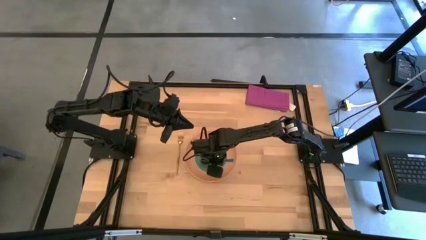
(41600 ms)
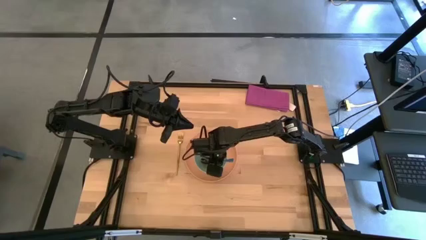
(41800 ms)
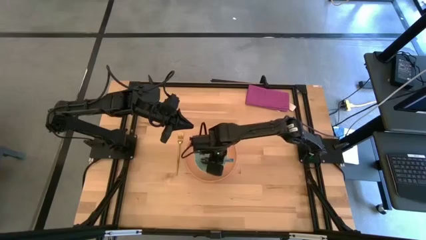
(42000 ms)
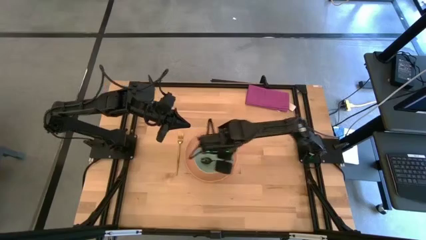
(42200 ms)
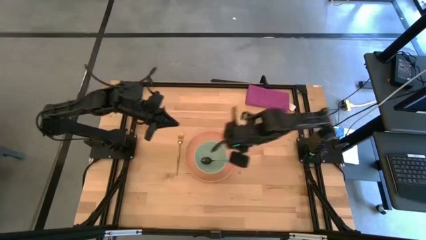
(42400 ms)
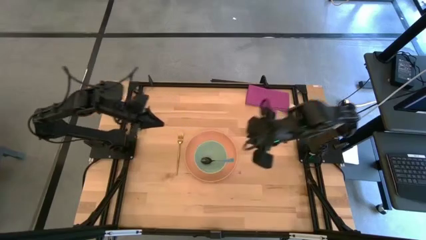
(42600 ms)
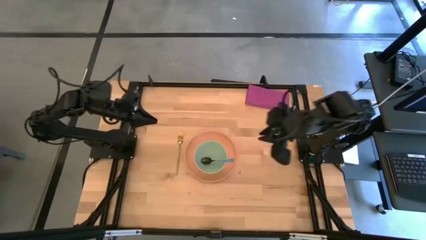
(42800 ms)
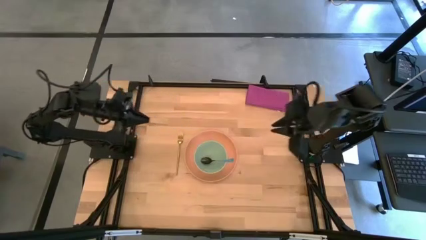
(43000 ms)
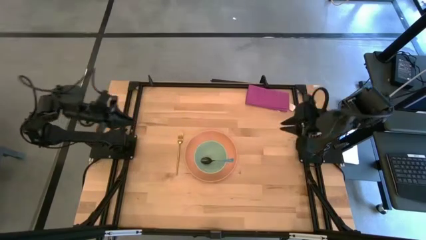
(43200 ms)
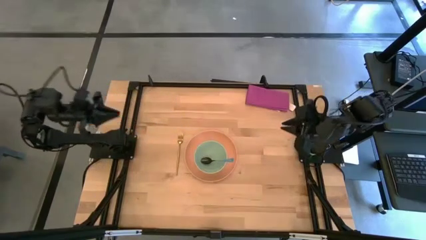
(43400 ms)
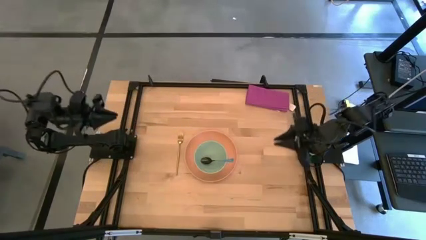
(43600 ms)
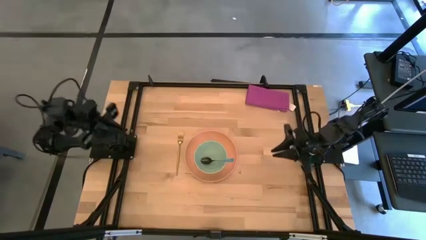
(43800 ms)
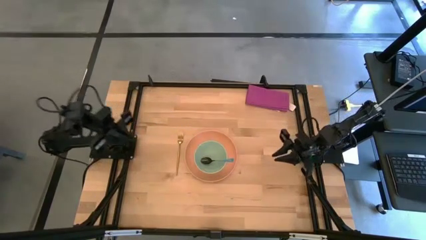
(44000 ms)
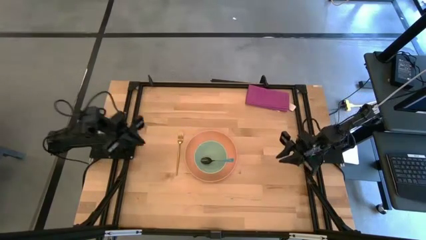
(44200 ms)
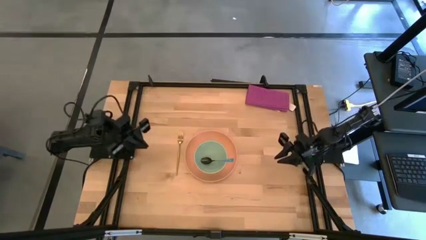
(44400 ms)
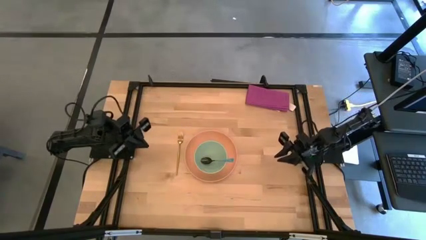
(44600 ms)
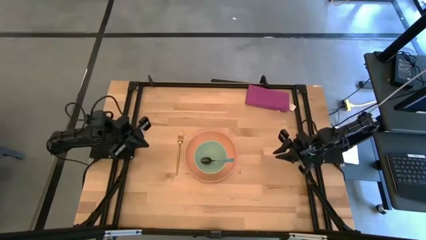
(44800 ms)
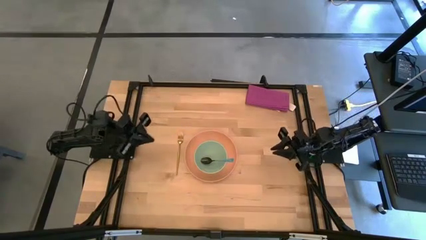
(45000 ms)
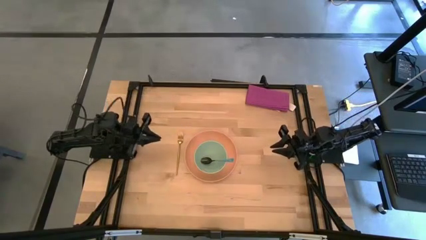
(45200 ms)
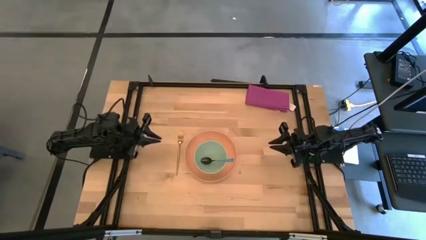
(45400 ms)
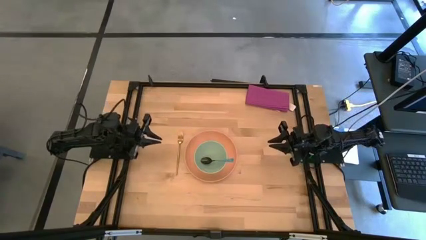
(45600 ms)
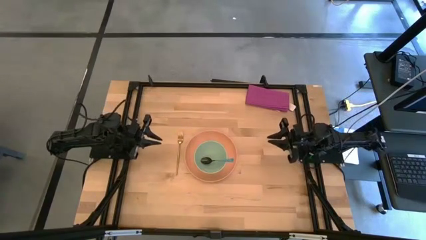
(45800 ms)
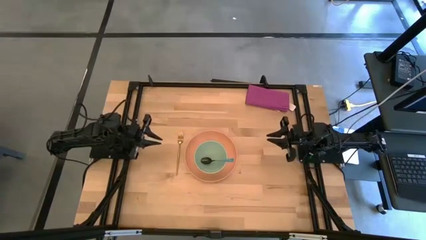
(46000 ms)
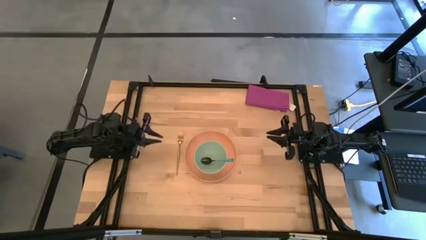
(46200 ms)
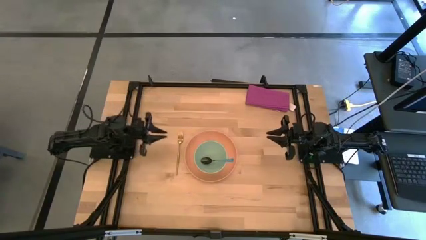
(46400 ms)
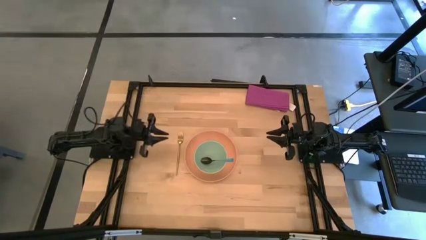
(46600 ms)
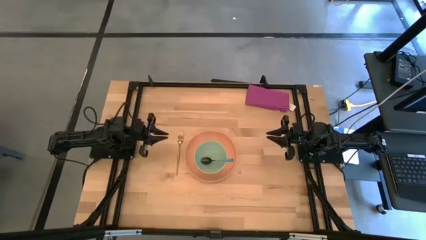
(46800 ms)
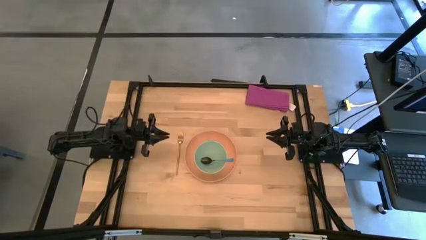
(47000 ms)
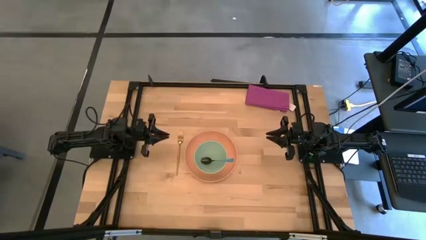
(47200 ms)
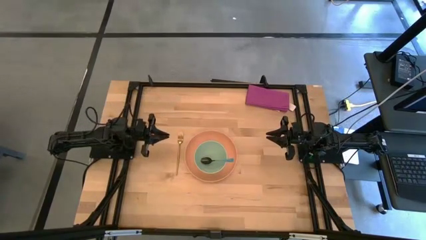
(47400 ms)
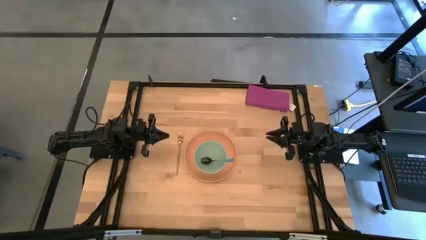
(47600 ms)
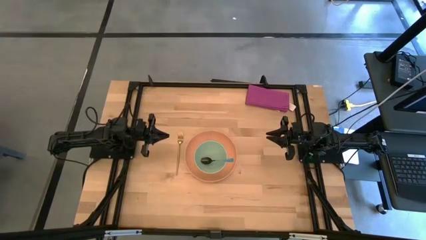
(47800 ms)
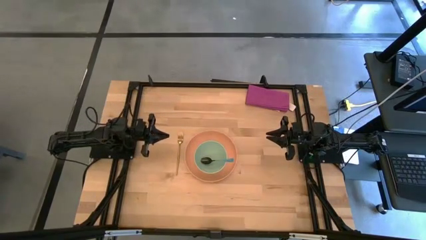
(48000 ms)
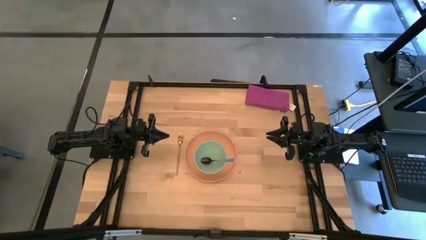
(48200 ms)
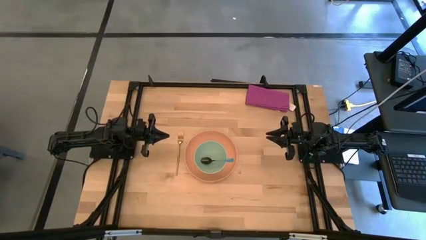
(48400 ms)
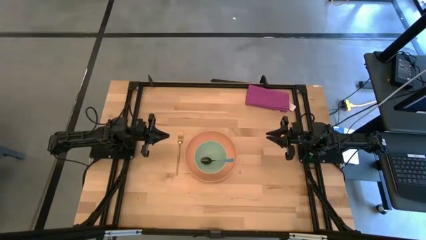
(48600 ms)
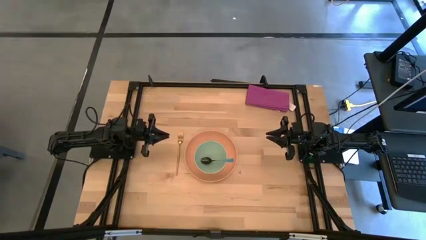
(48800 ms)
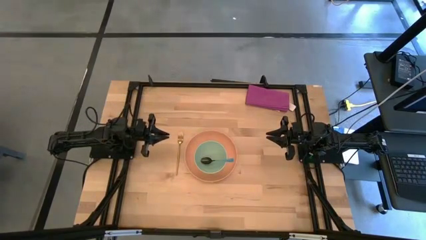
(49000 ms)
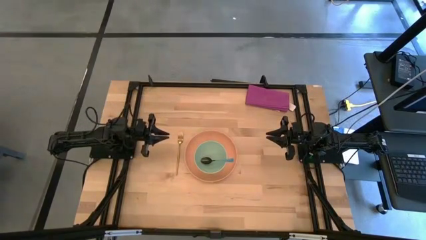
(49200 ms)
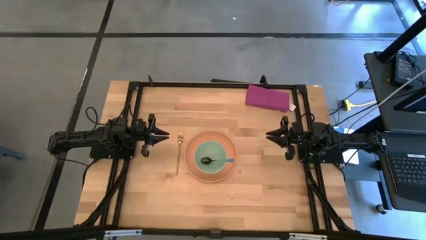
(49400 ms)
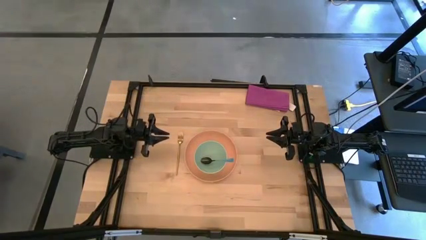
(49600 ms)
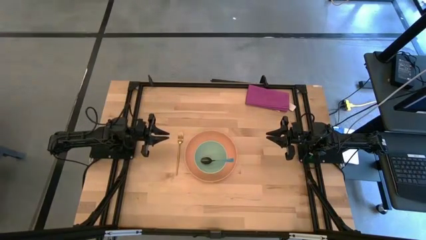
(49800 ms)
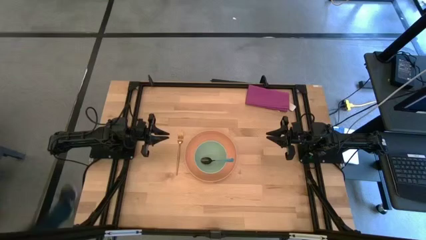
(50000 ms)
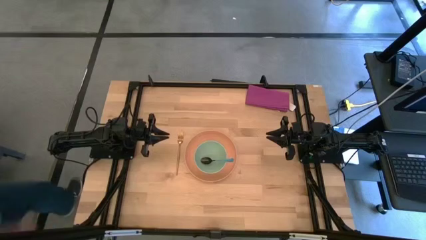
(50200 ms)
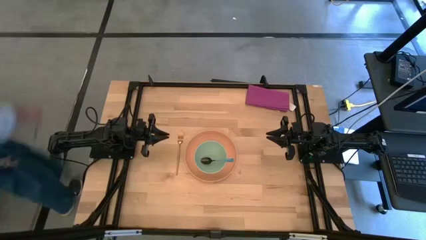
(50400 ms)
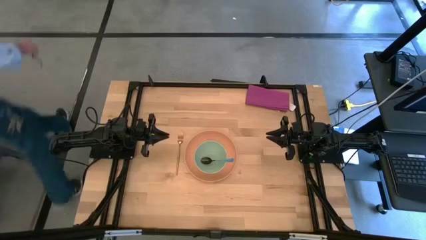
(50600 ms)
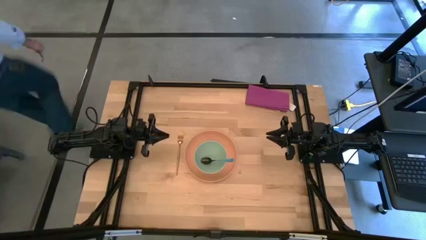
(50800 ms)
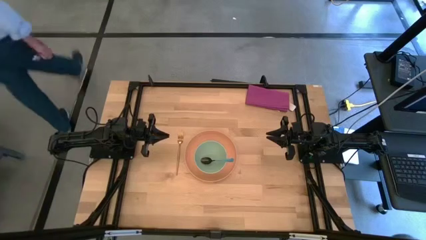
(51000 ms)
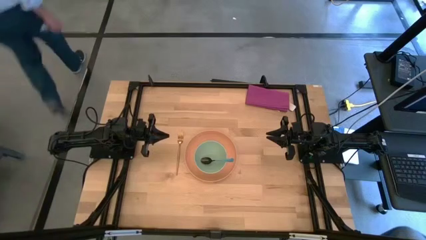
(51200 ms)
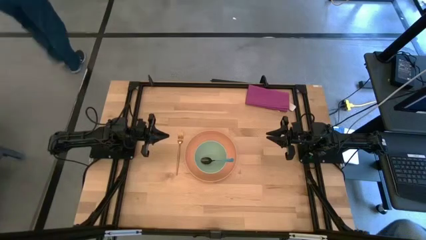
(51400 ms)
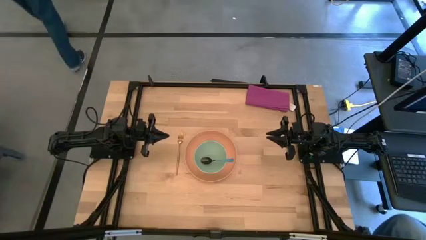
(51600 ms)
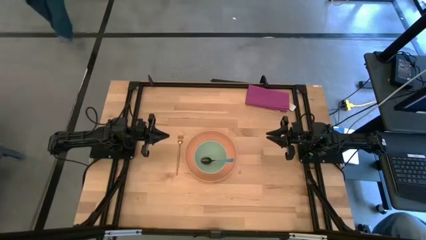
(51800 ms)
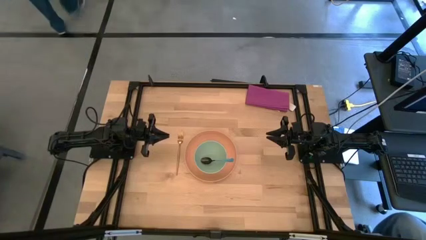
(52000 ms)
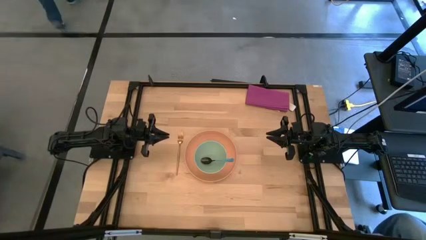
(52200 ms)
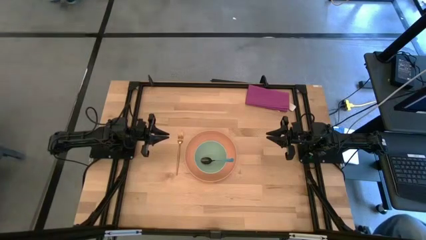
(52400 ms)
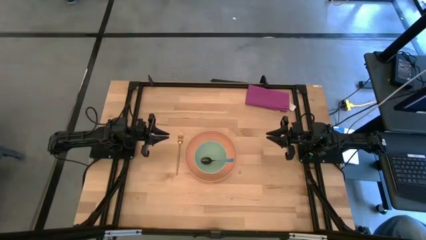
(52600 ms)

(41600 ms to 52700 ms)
Task: Set table place
Return to Home Position

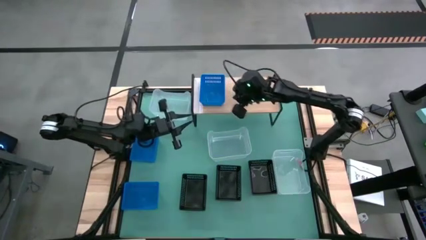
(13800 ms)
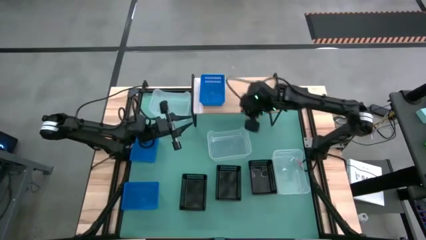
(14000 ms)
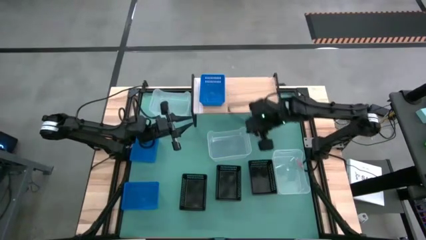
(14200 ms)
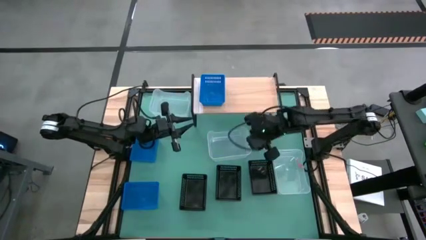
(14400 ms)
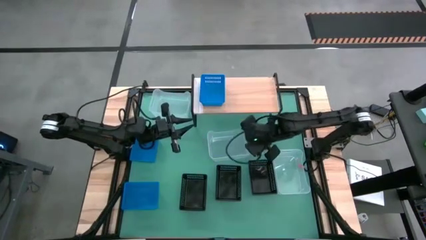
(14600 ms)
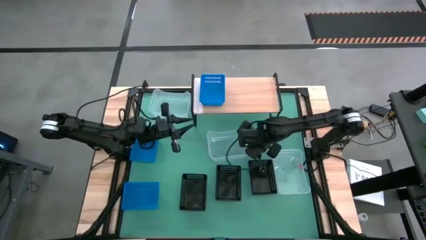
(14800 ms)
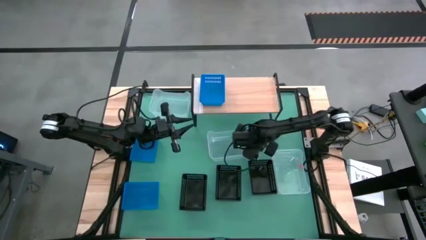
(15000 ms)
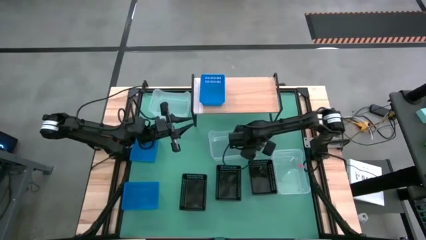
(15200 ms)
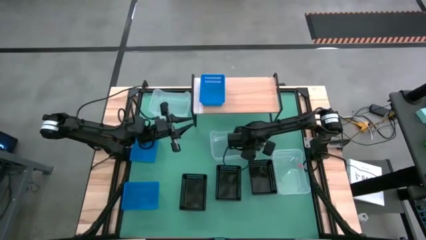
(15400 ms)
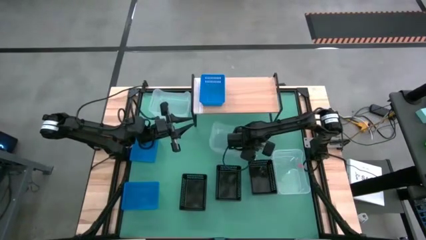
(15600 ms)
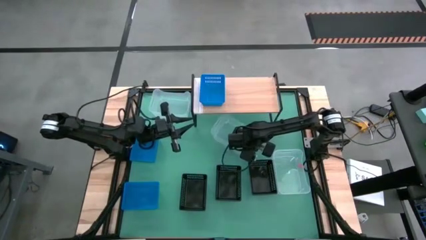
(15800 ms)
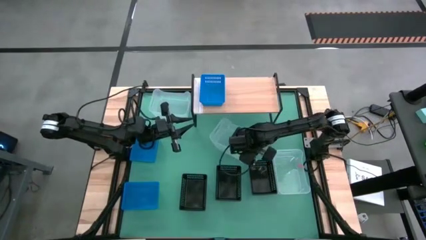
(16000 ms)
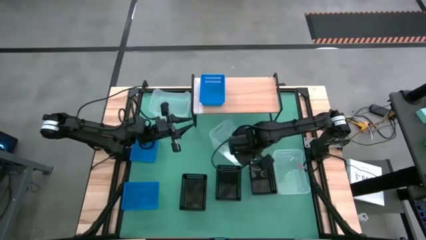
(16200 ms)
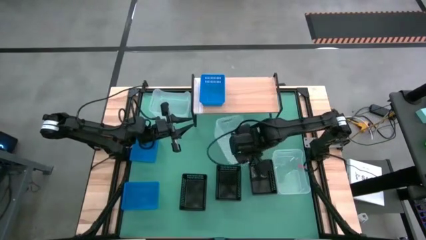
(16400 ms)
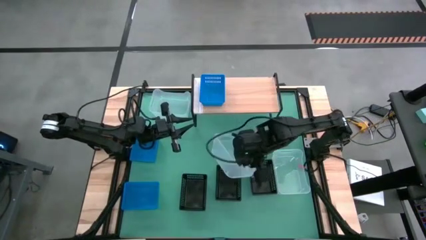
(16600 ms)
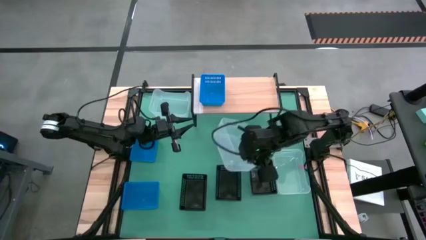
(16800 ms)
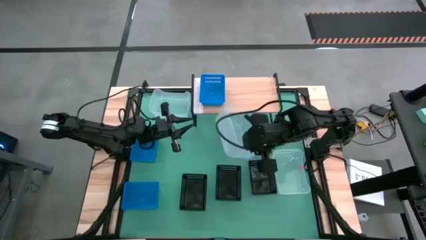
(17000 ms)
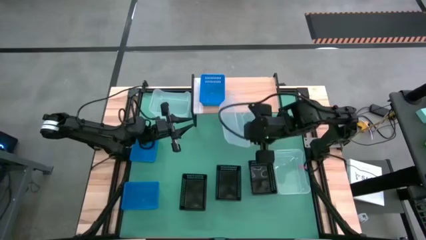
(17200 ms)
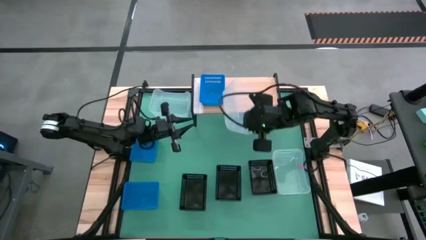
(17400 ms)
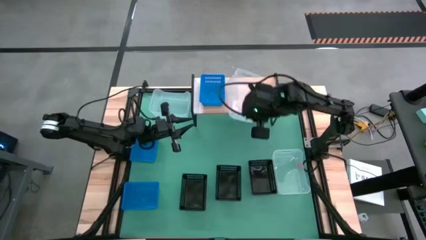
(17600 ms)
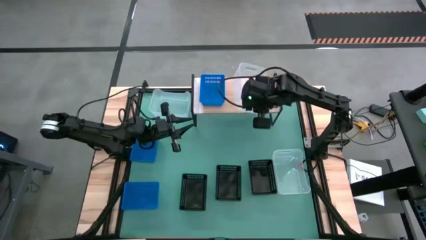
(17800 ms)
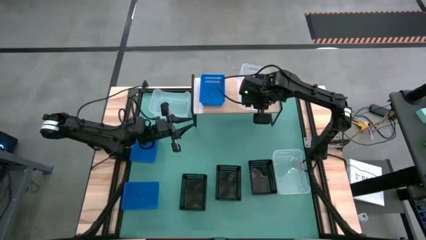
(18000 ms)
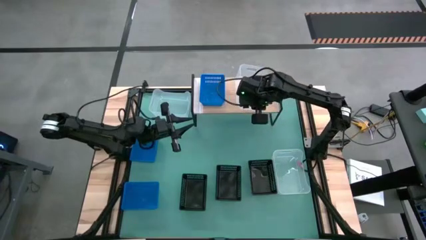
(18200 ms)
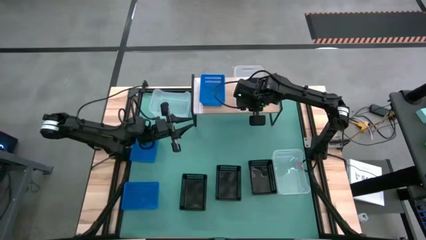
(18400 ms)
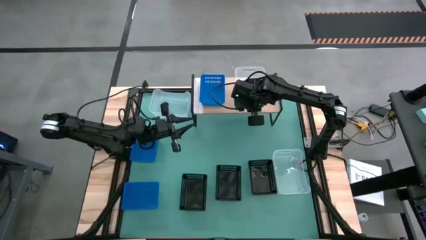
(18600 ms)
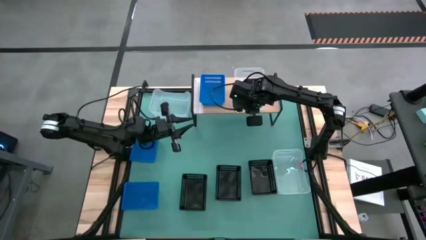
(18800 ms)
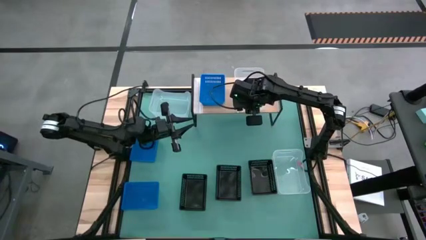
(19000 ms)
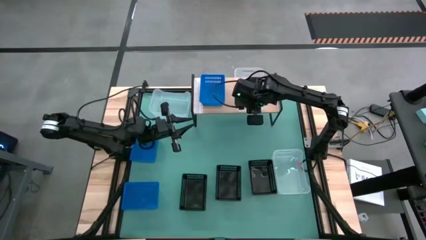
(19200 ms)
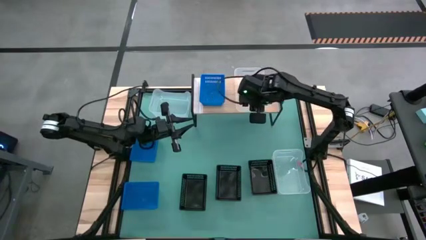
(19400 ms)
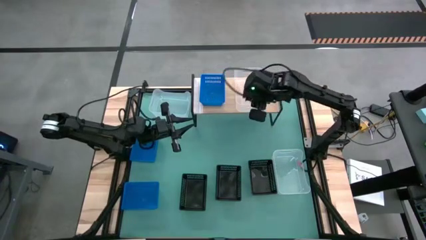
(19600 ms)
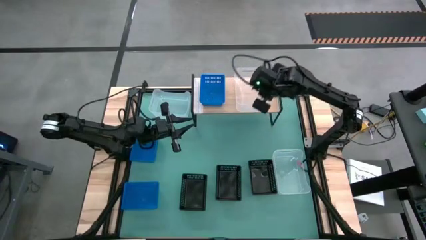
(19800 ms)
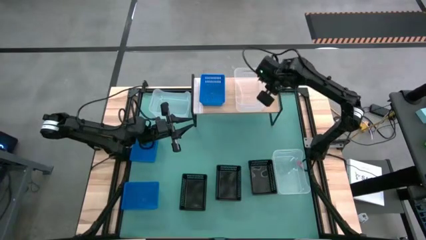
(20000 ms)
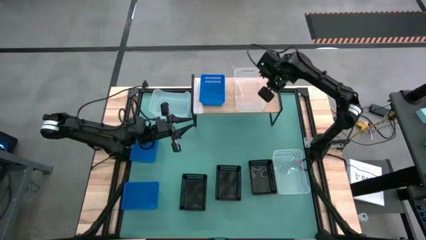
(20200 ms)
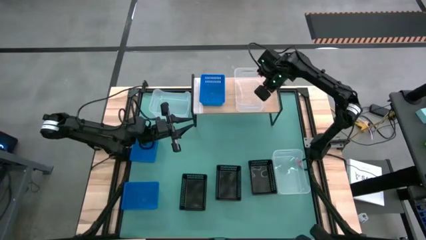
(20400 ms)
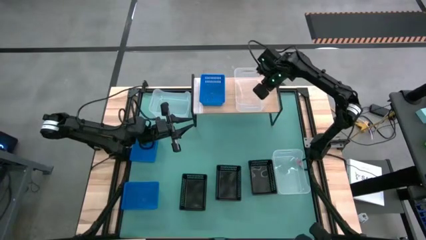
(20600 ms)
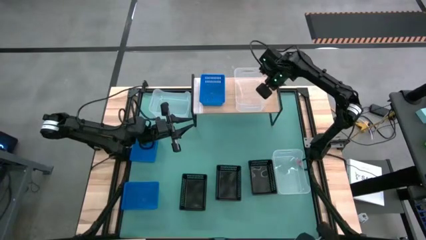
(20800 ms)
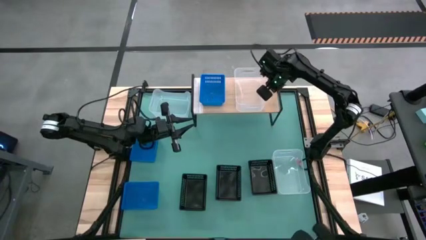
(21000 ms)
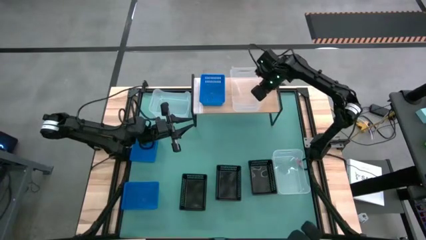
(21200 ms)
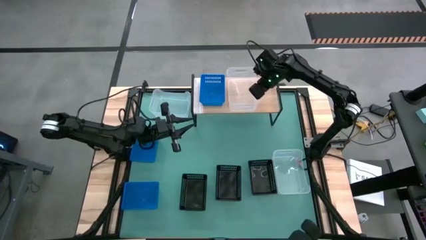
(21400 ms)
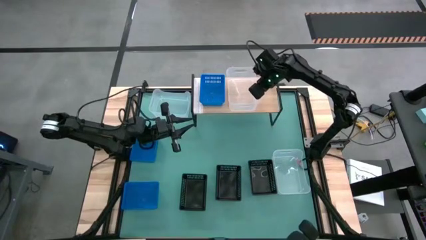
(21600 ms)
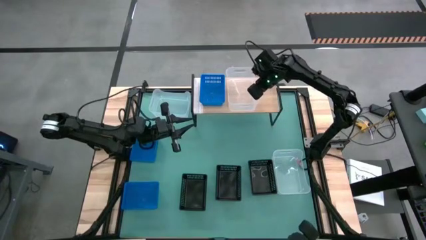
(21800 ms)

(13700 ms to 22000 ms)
Task: Stack baskets on shelf by color
Put the center transparent bin on the shelf
